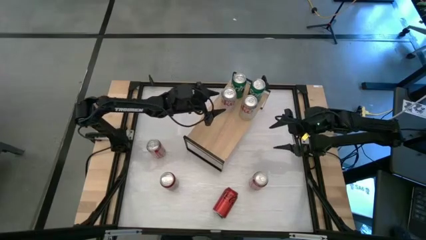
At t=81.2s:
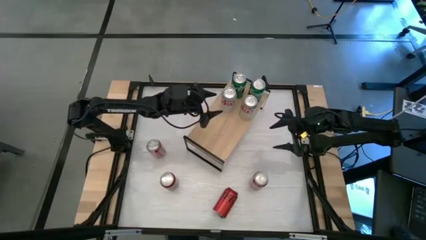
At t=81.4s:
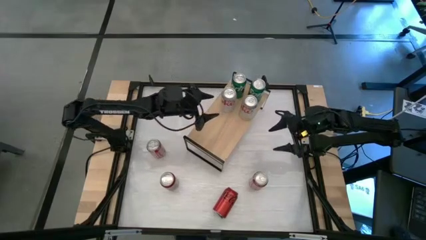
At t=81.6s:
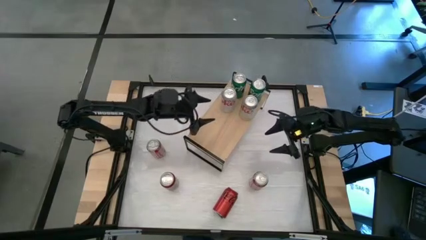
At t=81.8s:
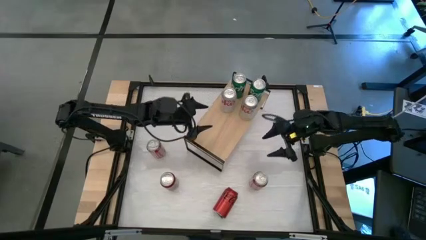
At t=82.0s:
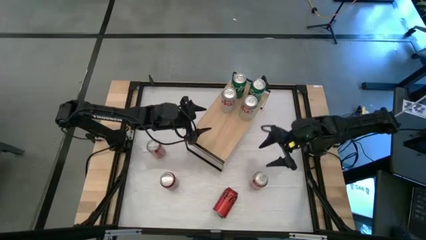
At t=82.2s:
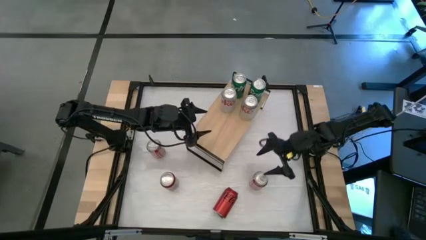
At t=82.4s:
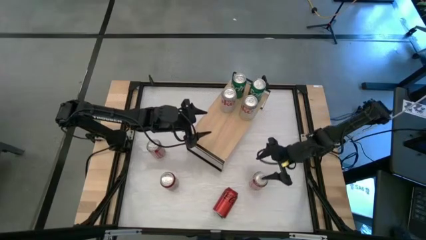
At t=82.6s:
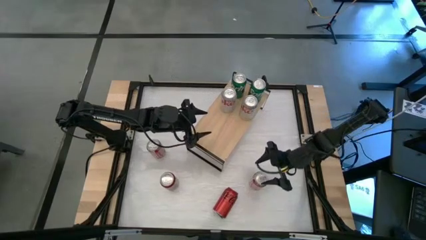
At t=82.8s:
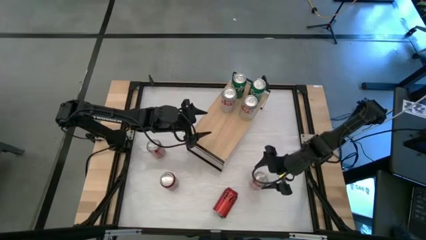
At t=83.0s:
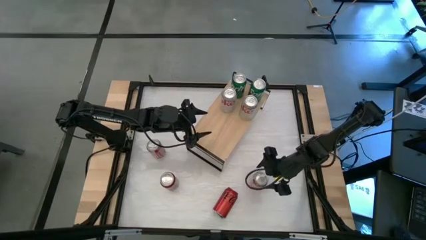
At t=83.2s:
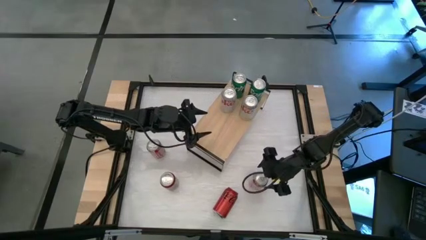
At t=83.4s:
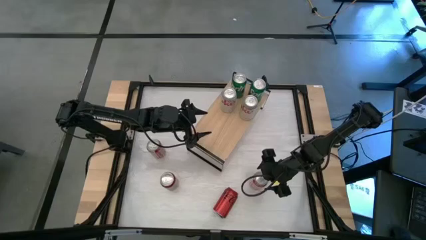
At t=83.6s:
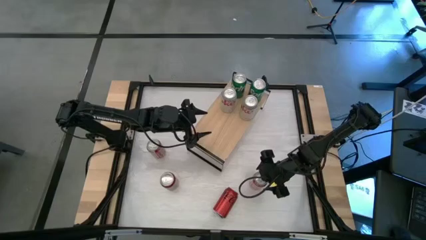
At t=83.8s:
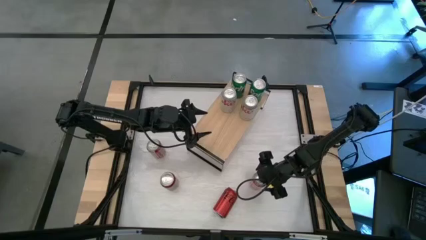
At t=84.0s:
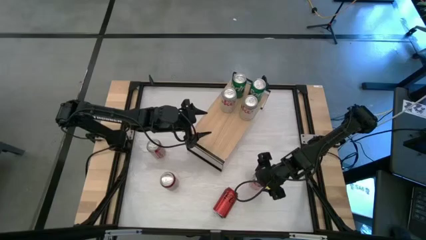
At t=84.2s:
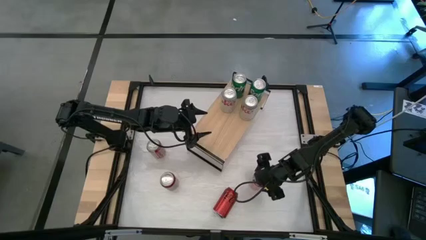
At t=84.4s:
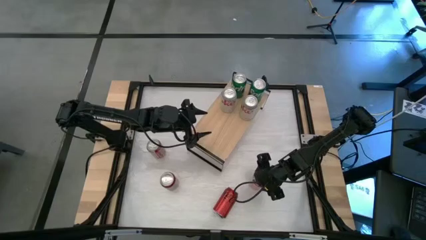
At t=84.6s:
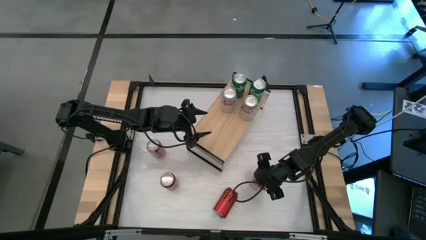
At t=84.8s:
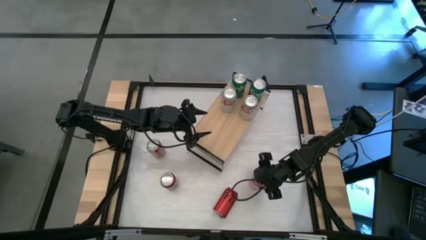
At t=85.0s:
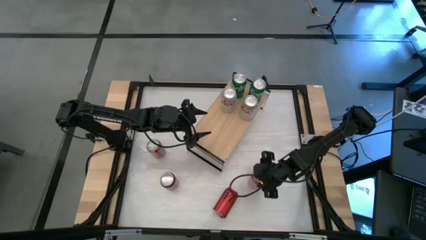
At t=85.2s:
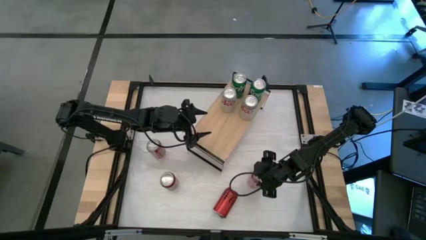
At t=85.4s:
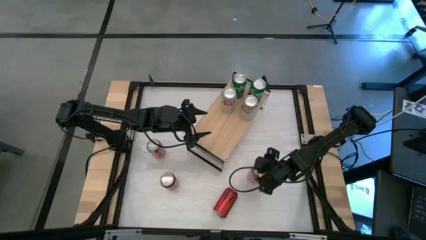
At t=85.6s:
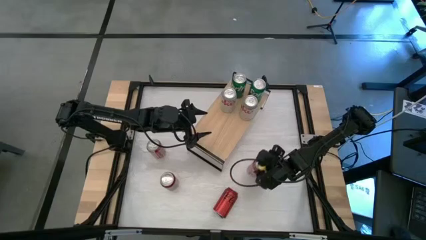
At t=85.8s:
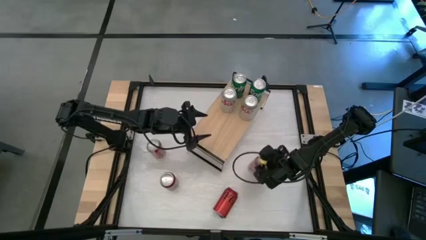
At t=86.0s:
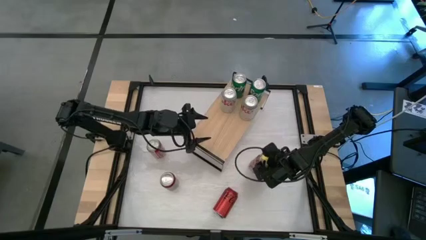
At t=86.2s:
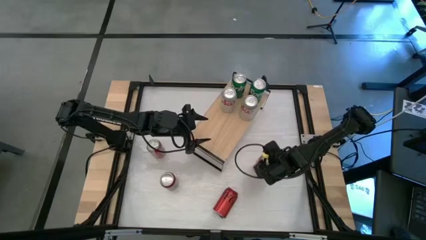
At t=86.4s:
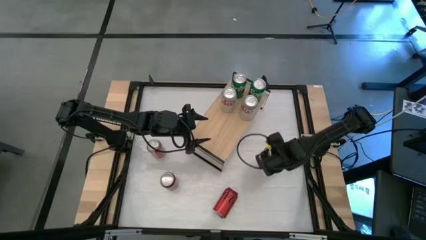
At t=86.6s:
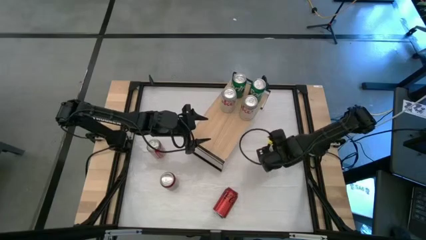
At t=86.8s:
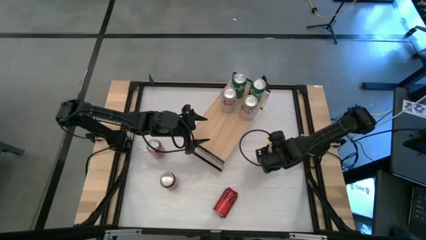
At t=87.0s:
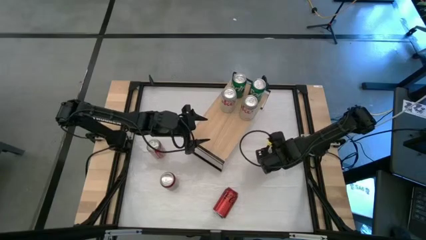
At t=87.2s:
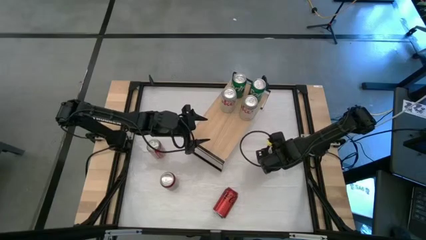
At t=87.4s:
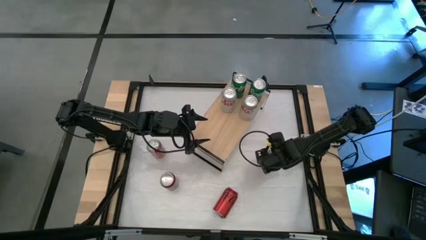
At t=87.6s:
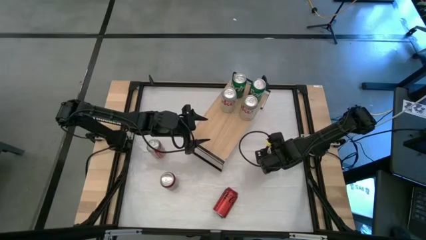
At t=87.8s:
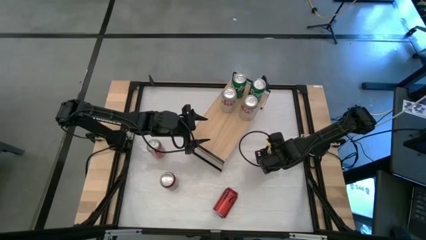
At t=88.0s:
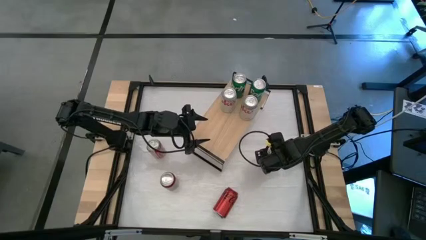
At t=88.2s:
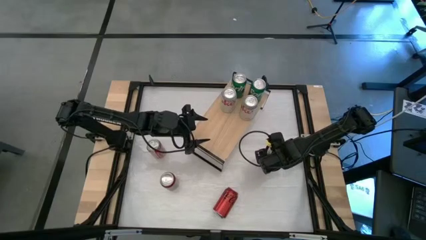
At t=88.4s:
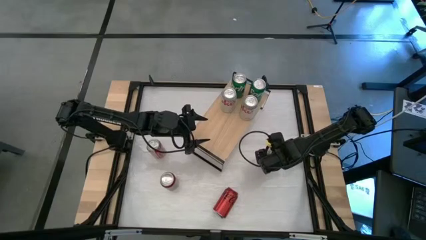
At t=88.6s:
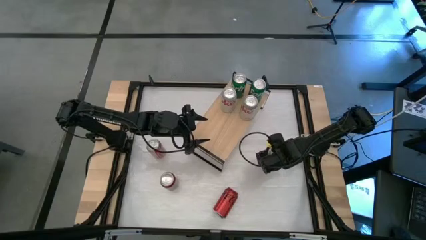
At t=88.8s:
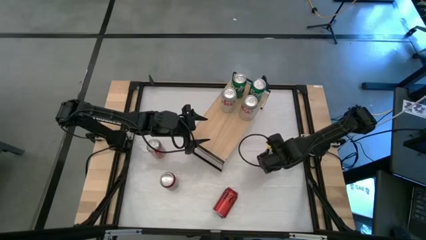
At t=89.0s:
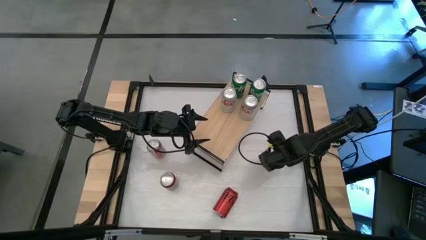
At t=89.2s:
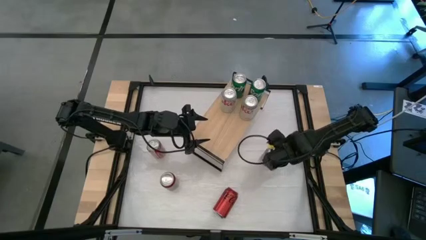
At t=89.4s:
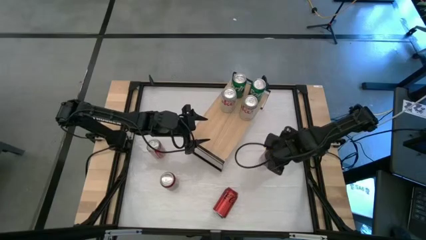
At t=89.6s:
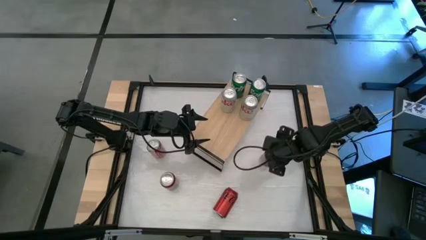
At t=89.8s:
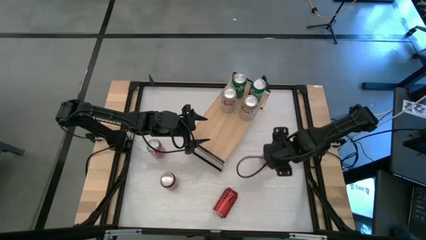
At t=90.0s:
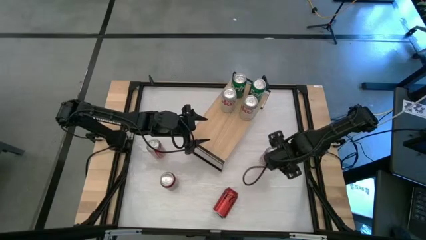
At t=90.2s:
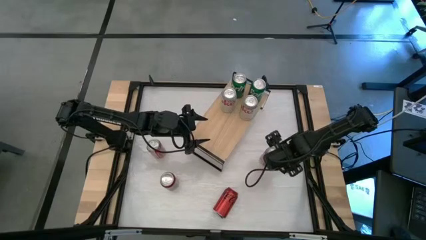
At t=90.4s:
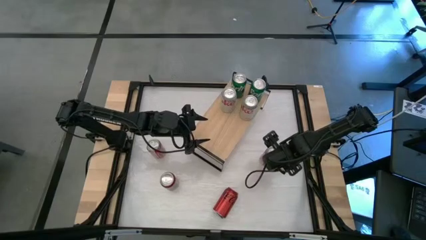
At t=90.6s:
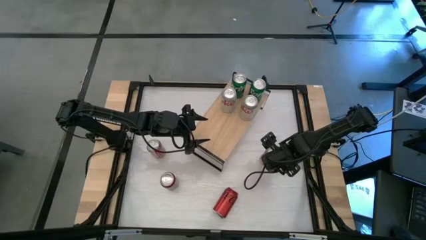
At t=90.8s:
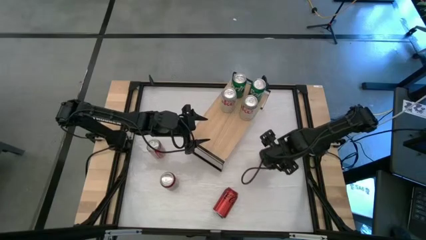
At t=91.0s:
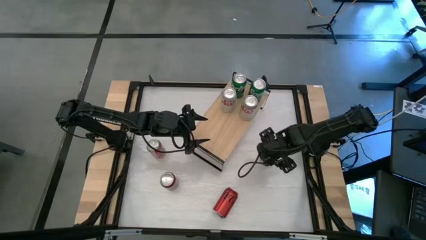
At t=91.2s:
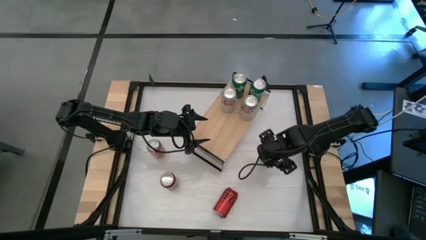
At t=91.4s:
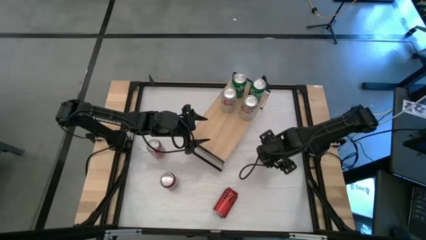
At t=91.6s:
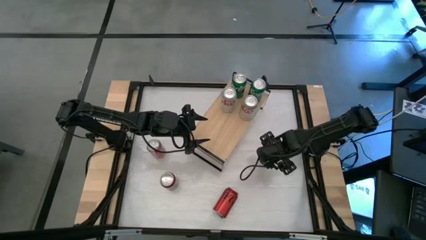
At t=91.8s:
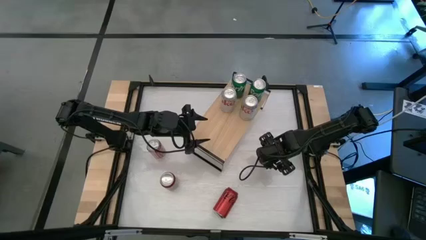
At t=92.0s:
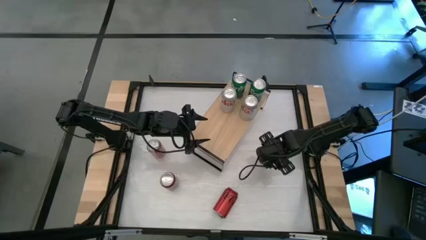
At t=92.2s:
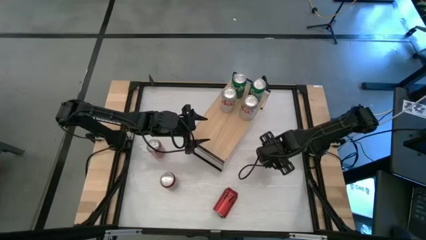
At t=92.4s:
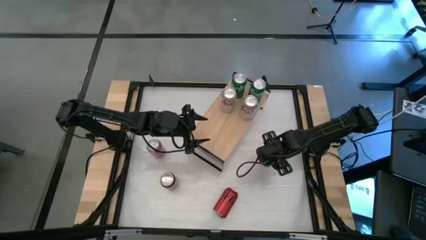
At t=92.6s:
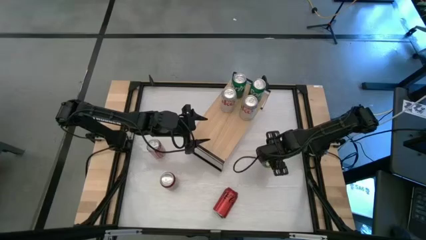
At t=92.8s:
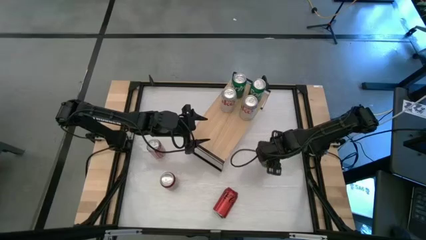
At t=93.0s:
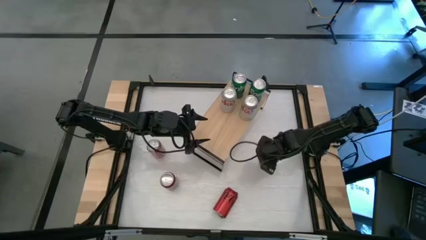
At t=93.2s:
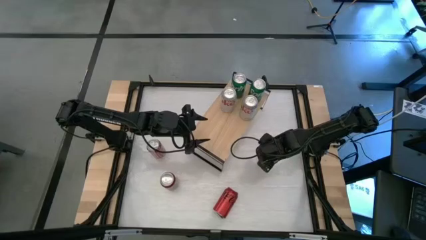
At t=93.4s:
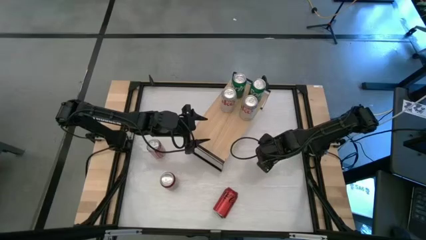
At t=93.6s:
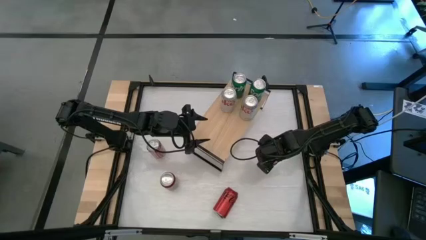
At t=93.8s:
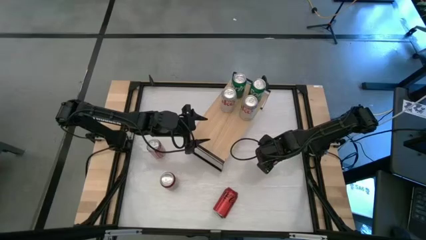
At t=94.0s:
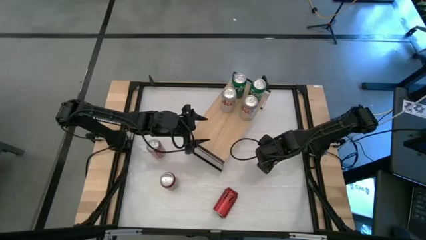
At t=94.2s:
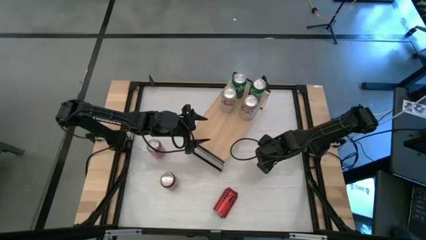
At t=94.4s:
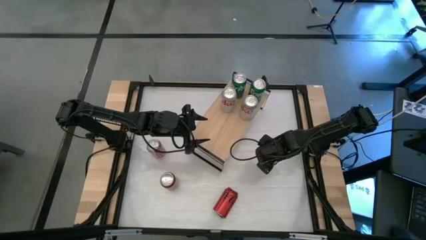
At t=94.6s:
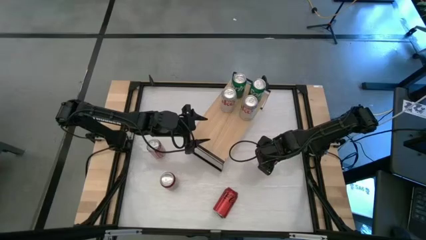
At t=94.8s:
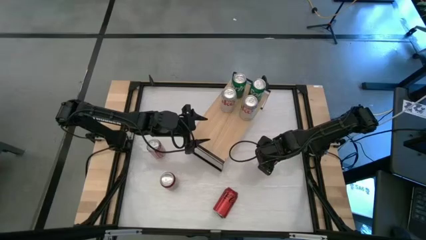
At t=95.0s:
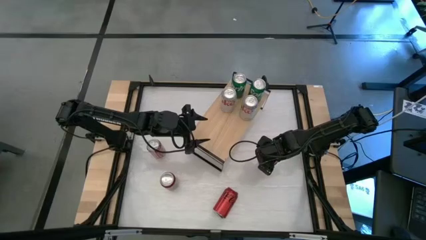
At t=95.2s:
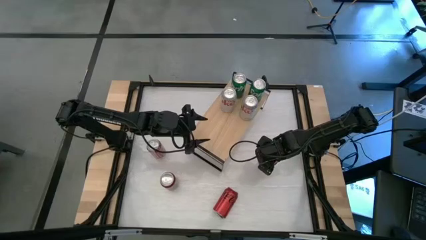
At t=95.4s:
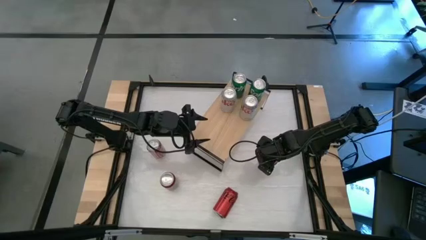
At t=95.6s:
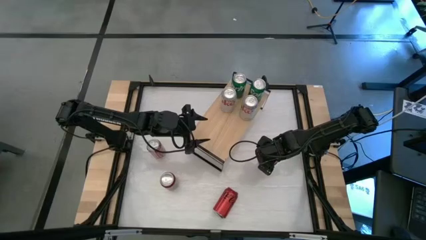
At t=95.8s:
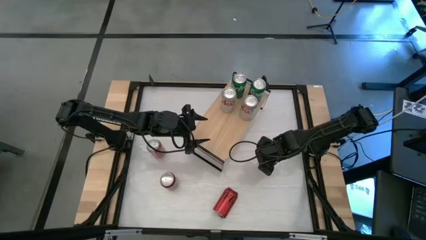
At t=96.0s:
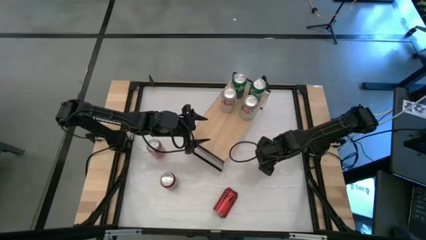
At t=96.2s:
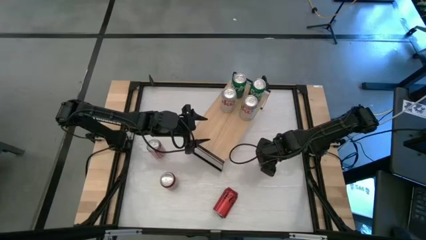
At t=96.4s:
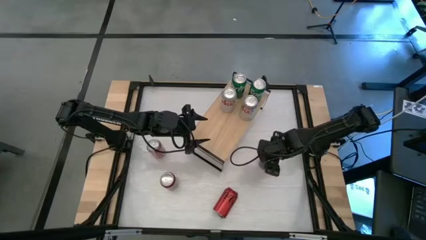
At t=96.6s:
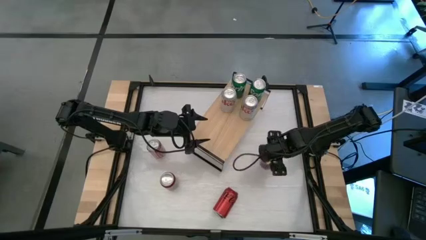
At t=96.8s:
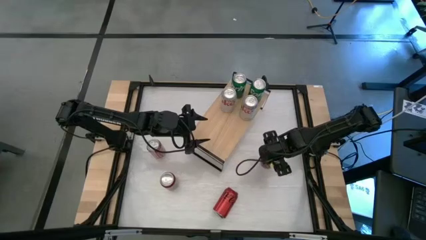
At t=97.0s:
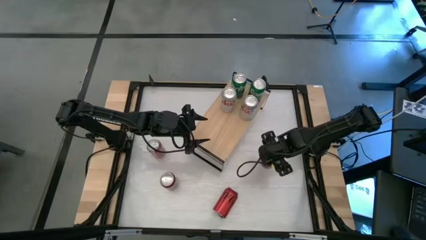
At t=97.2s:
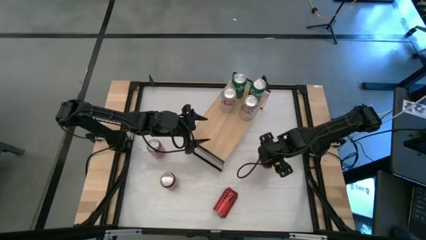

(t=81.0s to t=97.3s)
Task: Place canned beverage on shelf
Put the right red-white soda can on the shelf
